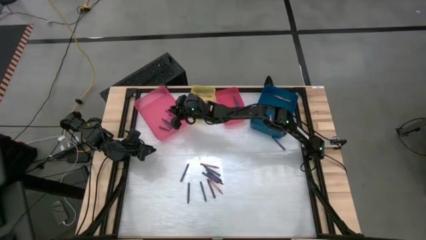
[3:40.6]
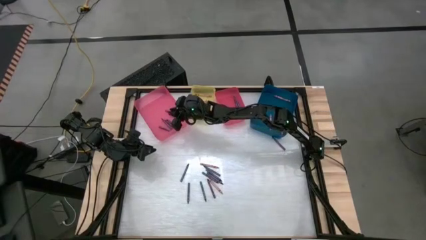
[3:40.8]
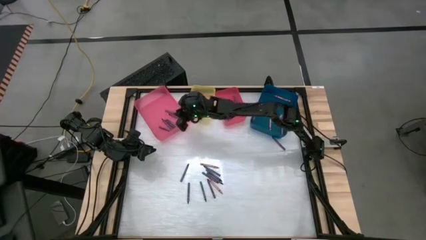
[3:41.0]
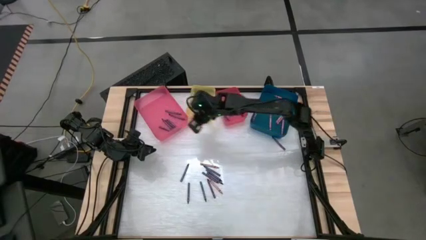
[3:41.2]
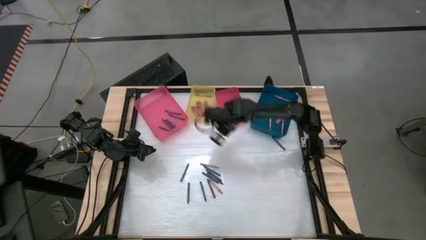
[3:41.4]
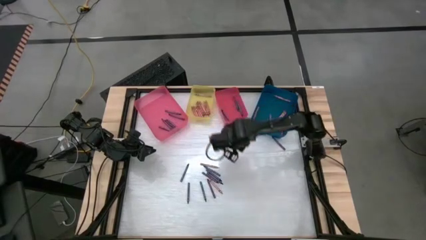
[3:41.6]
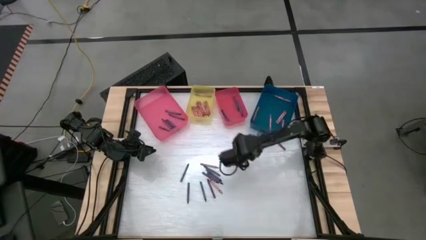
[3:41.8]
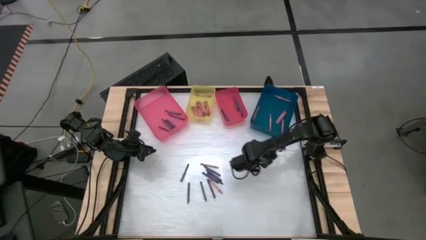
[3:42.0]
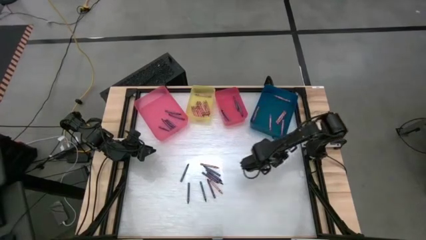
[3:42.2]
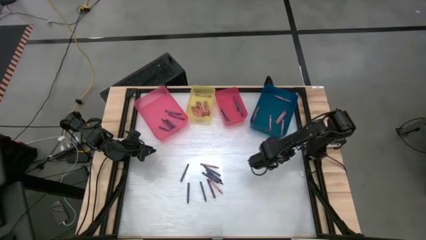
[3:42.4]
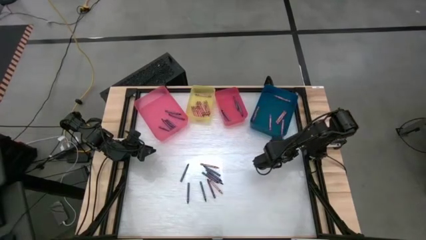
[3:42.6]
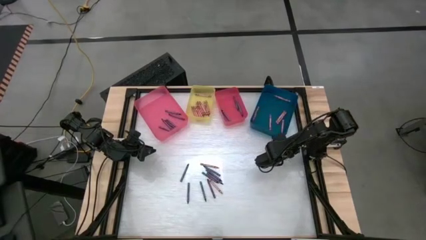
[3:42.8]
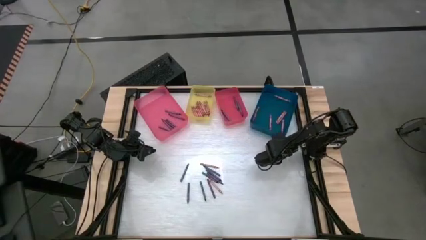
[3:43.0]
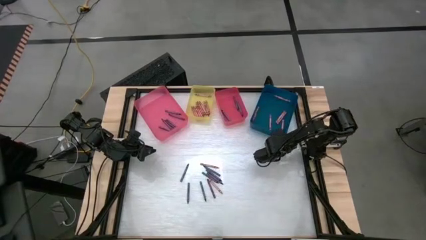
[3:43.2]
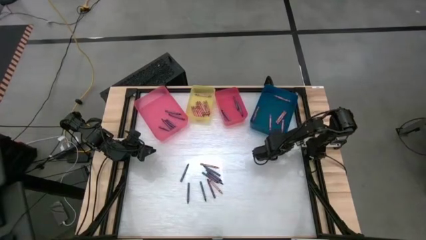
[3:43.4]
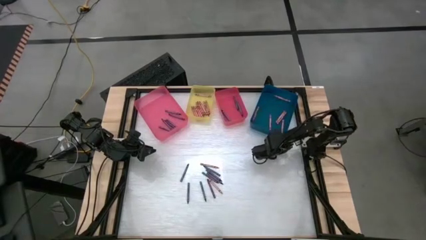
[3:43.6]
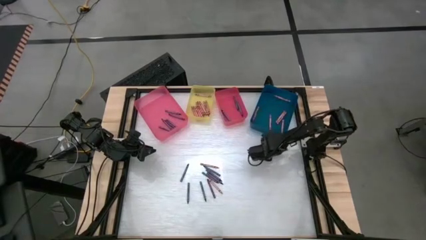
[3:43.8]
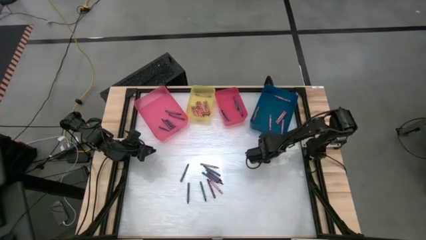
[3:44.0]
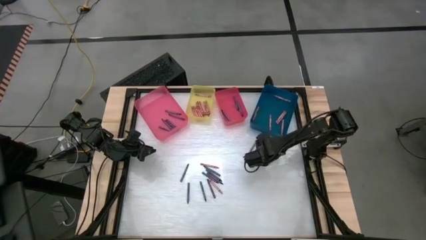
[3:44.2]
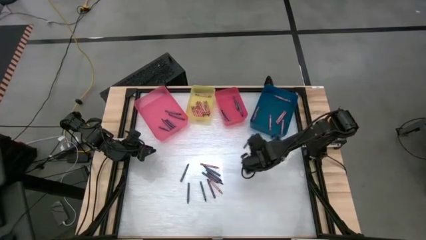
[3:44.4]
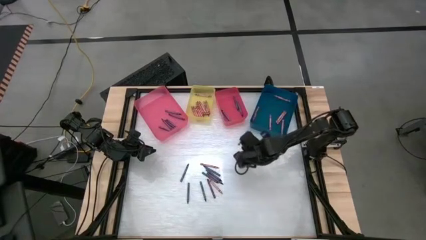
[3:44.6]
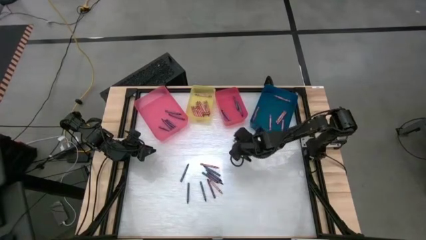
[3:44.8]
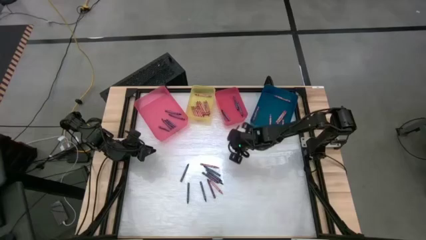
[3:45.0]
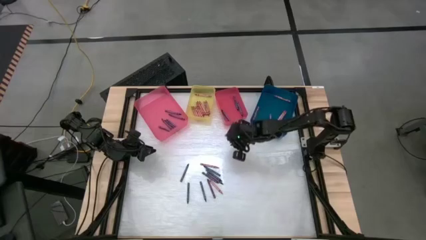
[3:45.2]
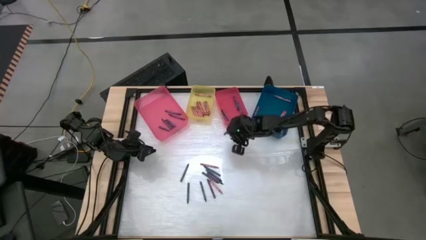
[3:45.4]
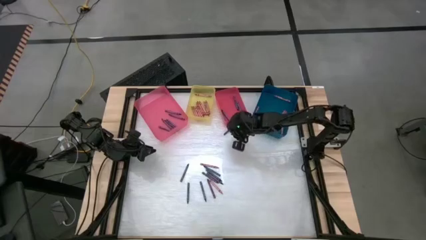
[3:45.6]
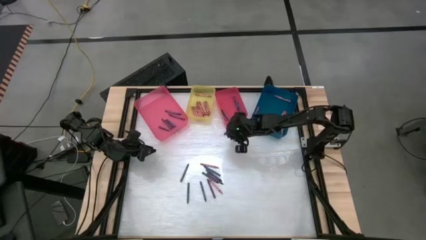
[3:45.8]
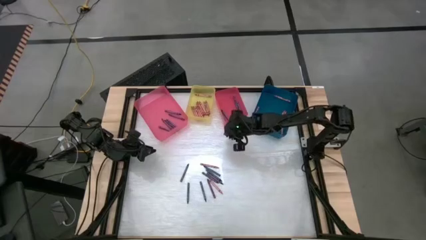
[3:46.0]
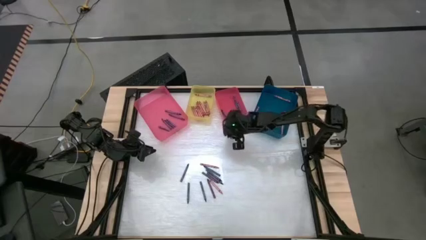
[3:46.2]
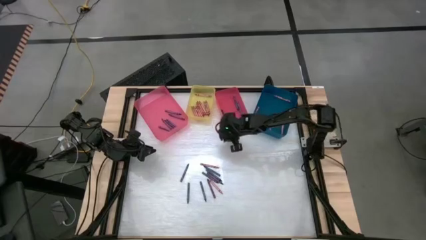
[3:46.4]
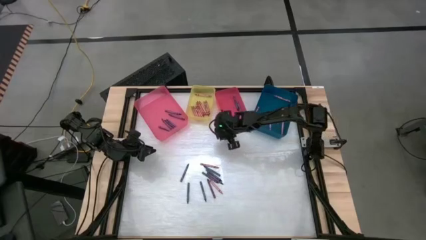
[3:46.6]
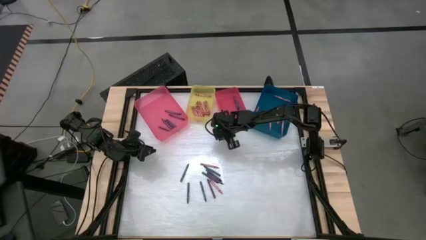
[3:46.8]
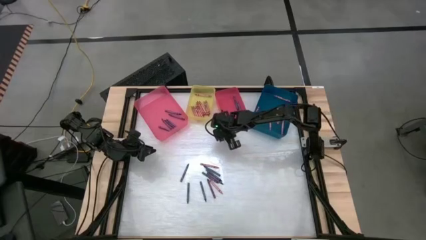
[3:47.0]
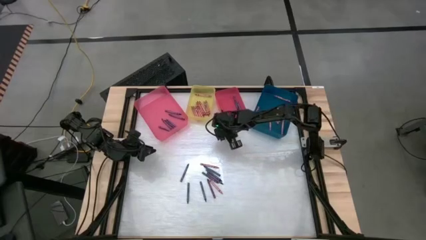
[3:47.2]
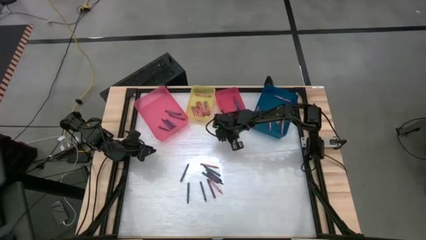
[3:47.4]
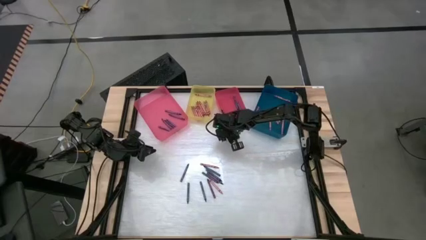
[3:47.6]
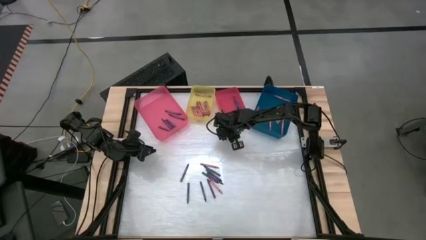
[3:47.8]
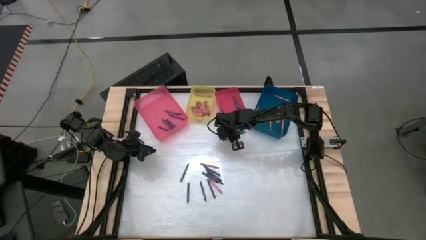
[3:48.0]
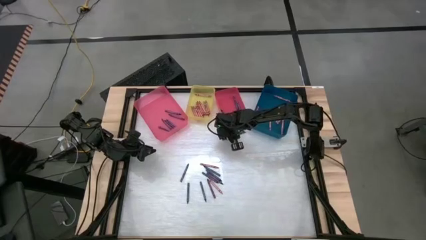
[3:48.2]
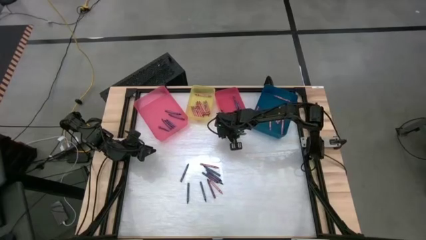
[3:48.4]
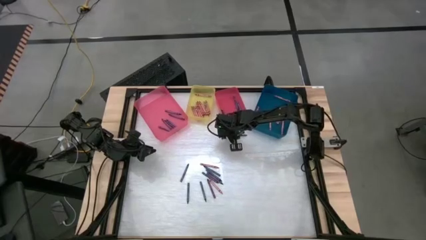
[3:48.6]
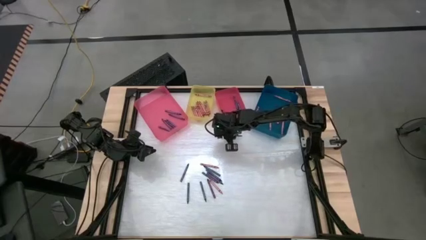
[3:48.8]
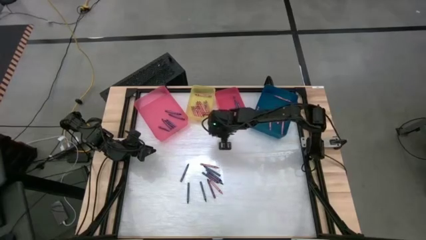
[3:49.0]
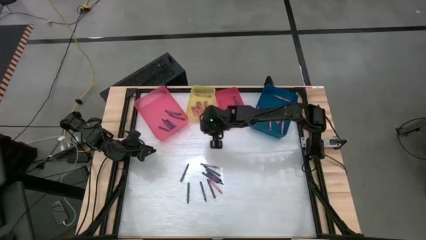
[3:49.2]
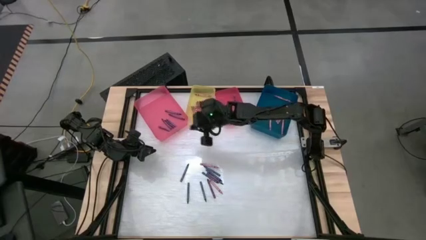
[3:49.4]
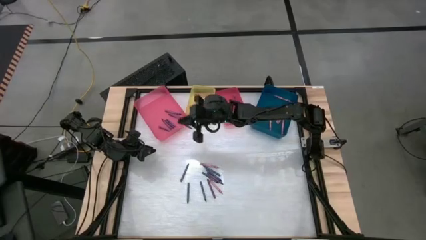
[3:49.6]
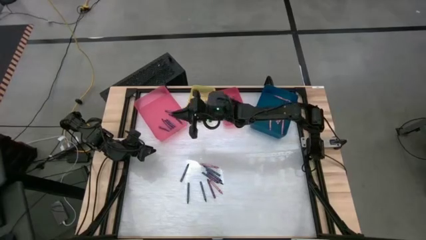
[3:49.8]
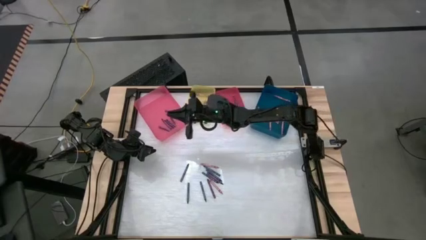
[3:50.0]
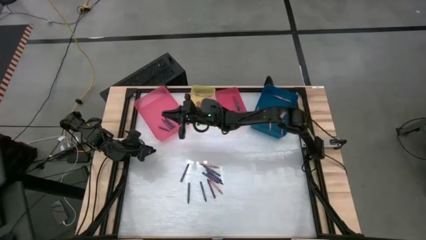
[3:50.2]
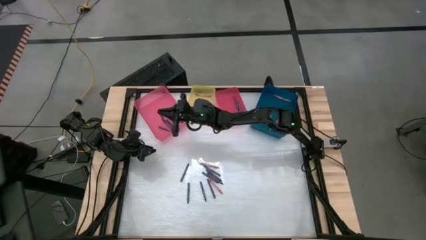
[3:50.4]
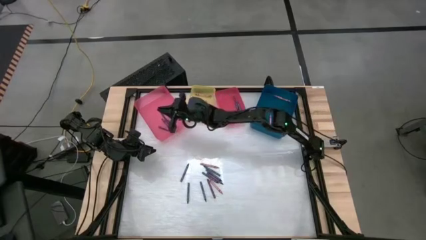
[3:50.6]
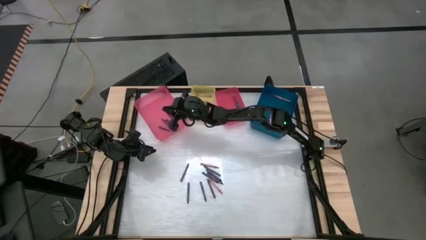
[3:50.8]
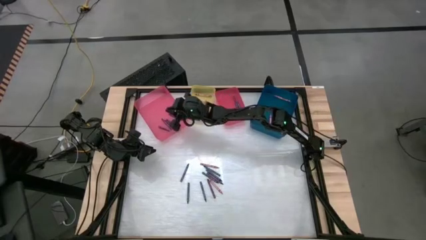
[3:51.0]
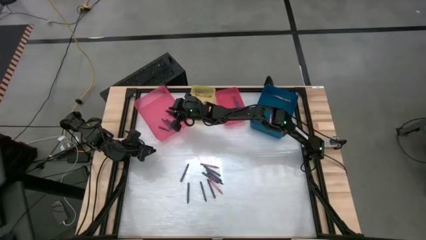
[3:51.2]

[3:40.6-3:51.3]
Task: Sort crayons
Put the violet crayon into the pink bin

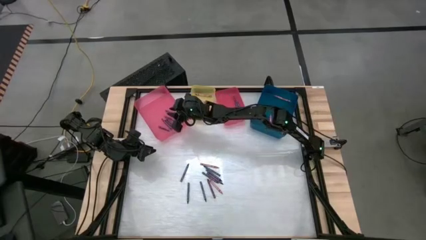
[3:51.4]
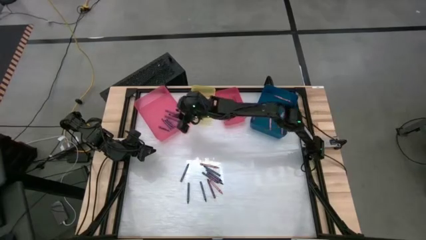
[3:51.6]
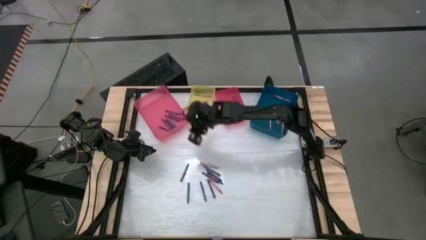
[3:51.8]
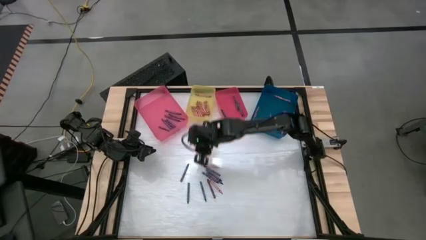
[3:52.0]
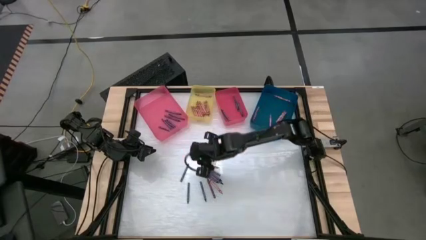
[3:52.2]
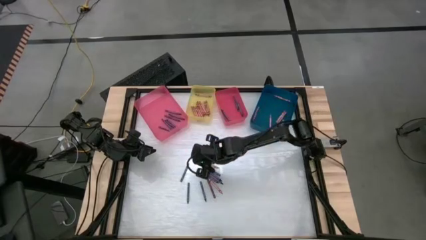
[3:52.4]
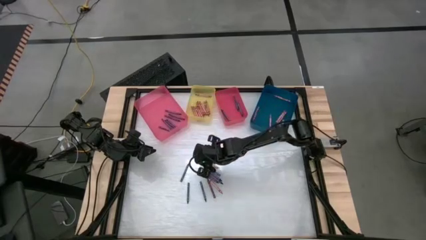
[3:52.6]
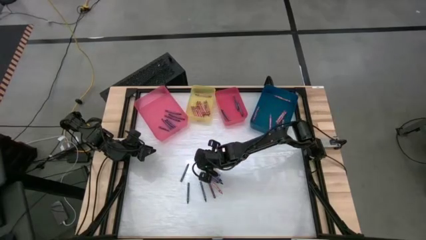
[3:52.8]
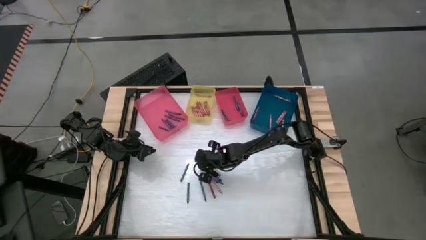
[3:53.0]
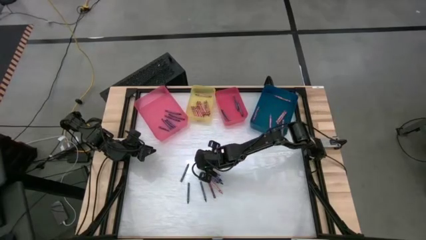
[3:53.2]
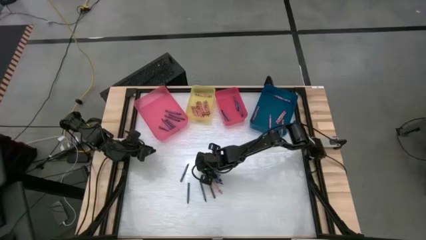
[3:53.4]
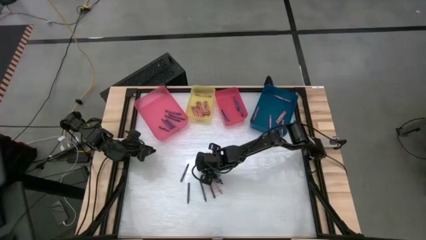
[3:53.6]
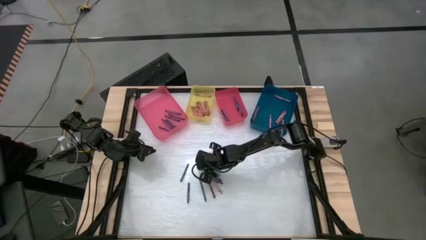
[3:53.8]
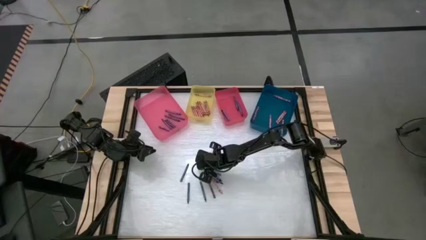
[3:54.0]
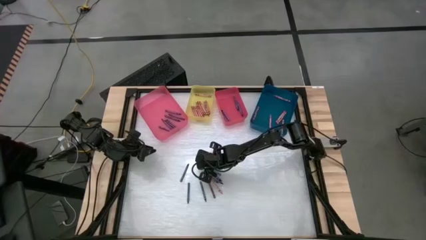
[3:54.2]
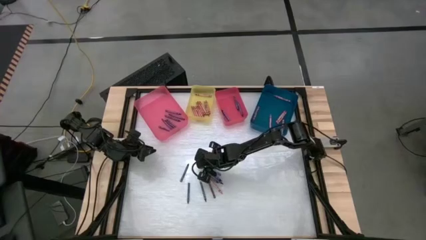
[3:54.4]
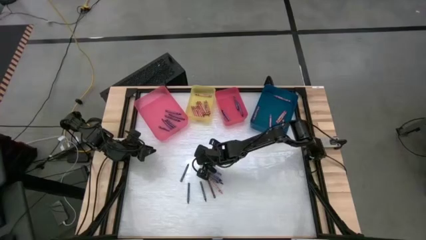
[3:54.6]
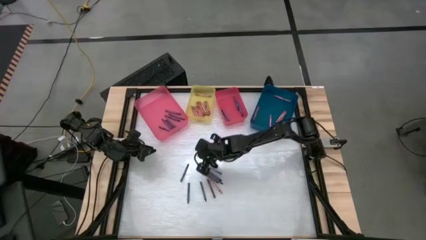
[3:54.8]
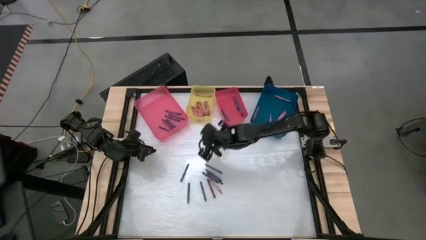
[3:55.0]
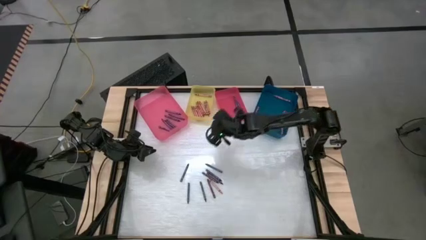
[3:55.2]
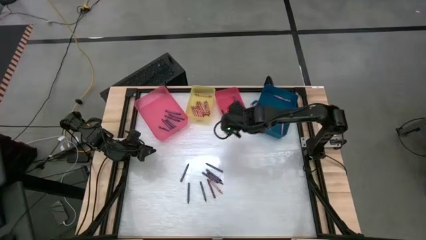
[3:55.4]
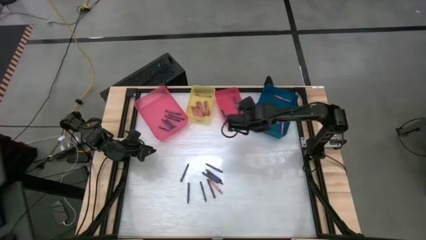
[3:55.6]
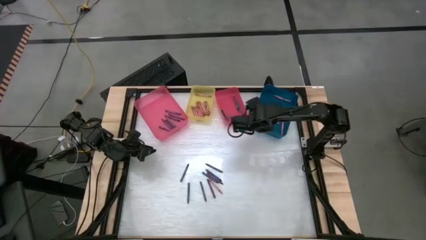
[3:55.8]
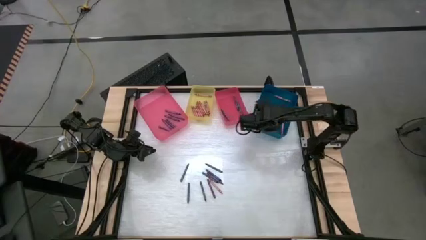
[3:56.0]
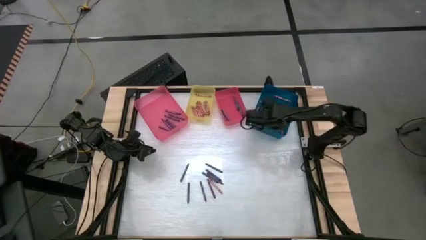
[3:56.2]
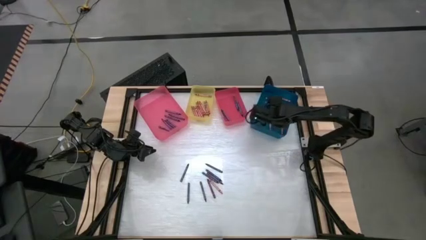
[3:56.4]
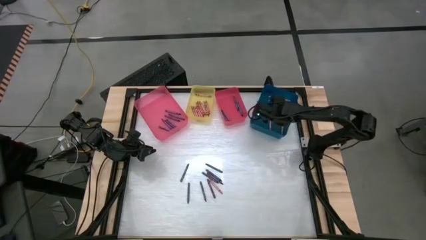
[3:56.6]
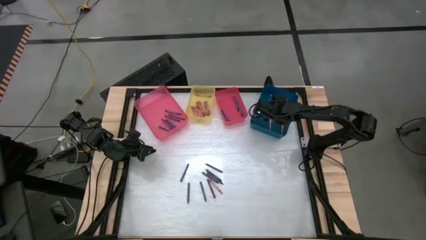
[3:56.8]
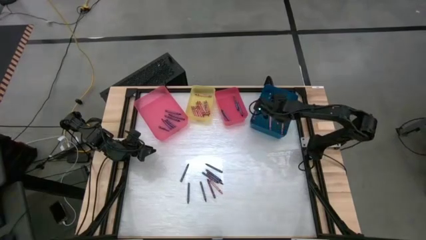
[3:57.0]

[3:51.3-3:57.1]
Put the pink crayon into the blue bin
